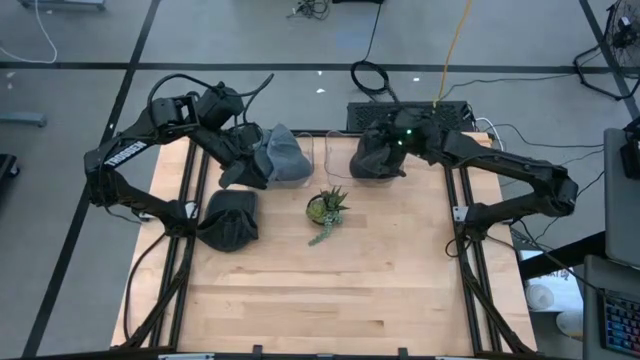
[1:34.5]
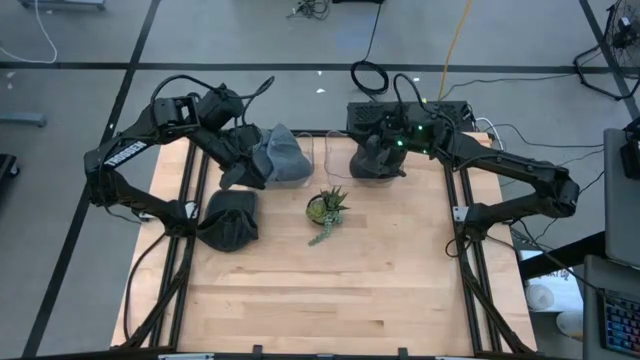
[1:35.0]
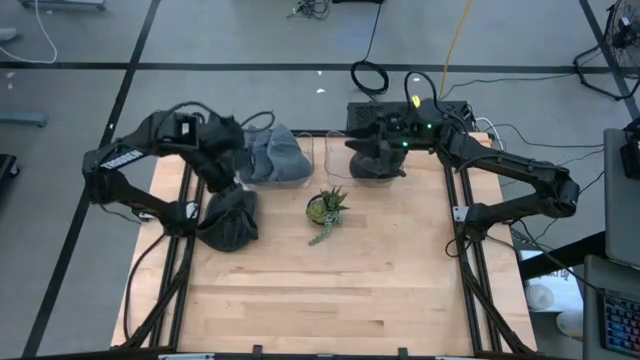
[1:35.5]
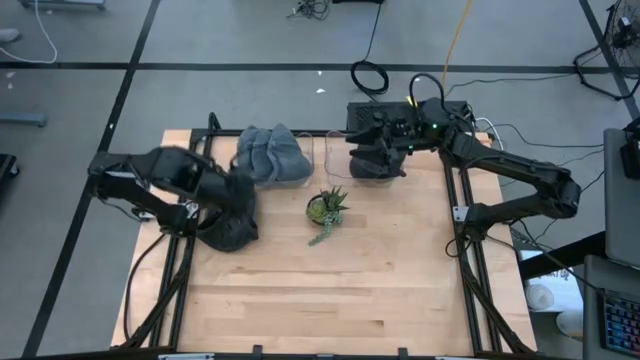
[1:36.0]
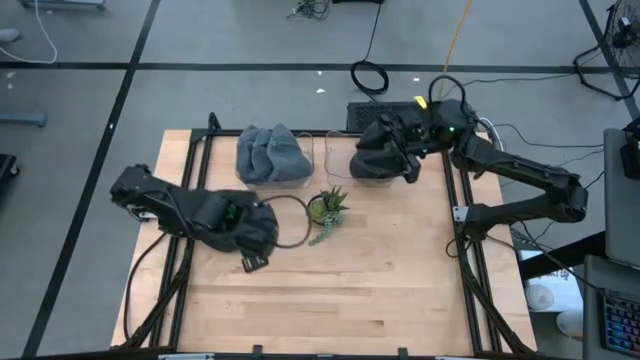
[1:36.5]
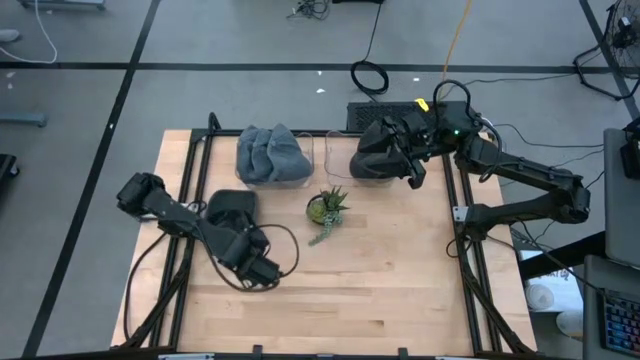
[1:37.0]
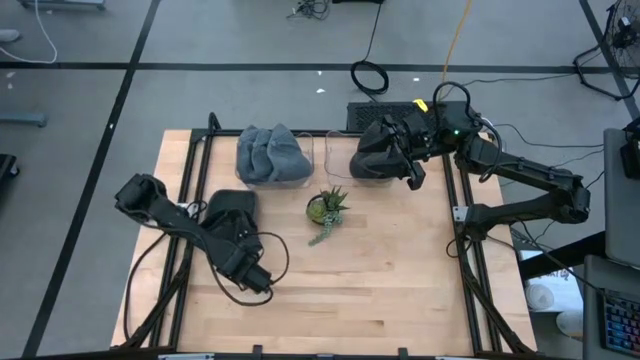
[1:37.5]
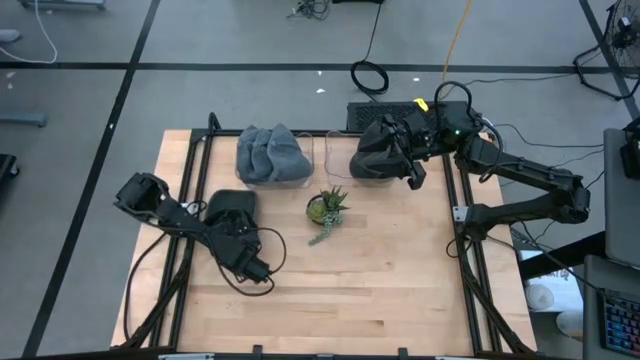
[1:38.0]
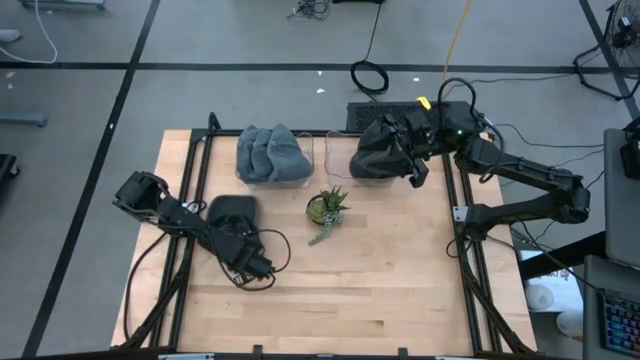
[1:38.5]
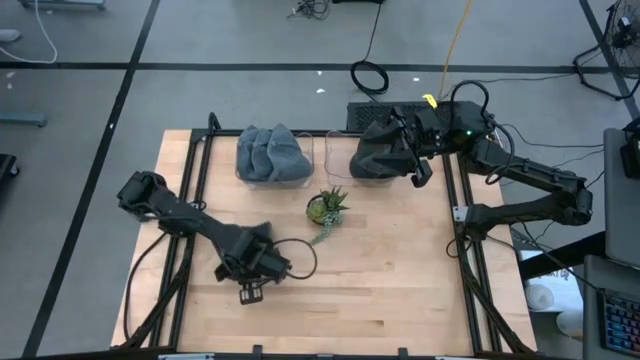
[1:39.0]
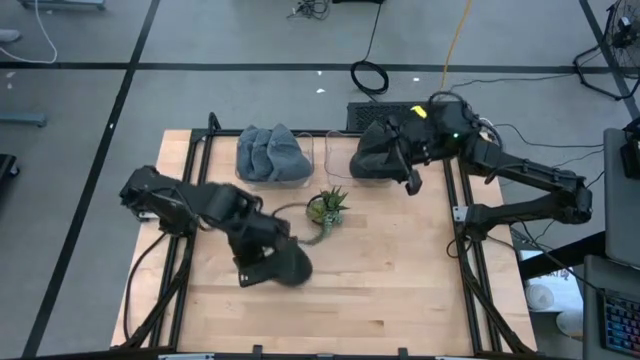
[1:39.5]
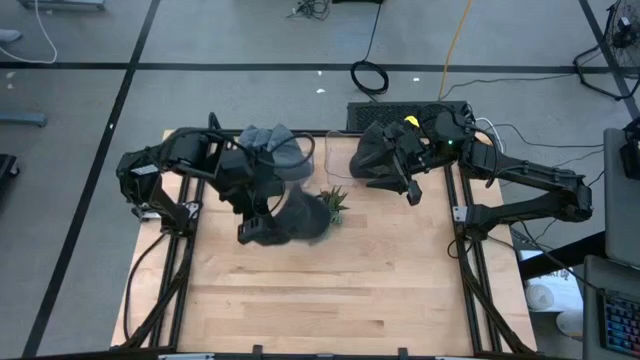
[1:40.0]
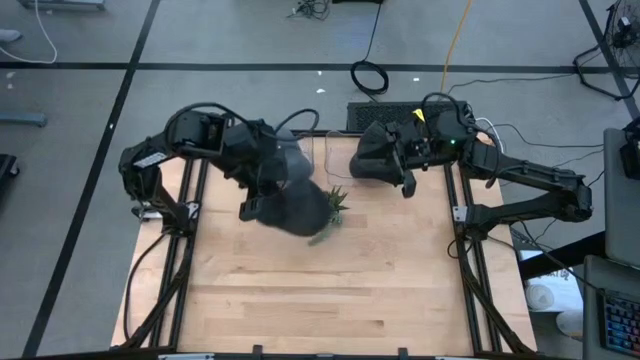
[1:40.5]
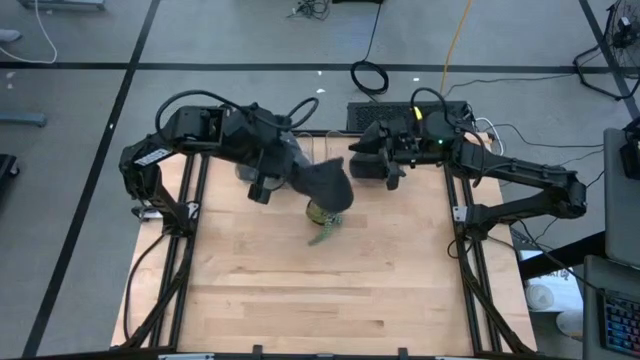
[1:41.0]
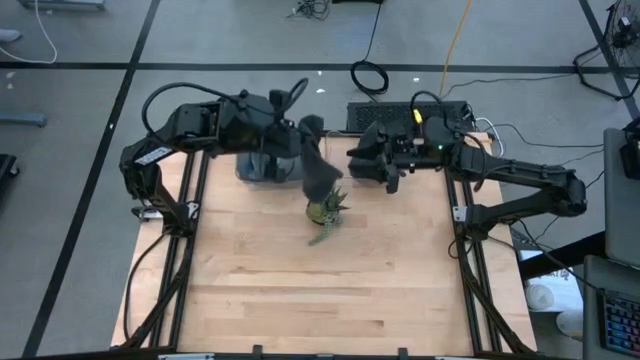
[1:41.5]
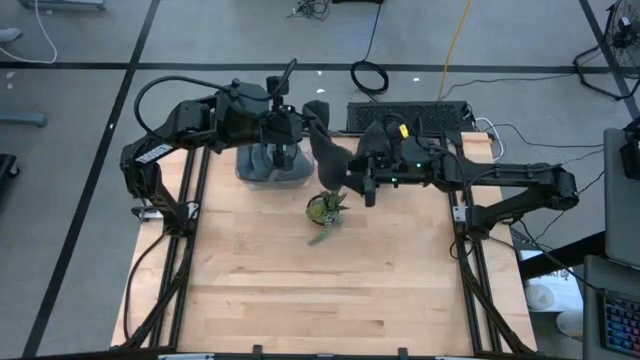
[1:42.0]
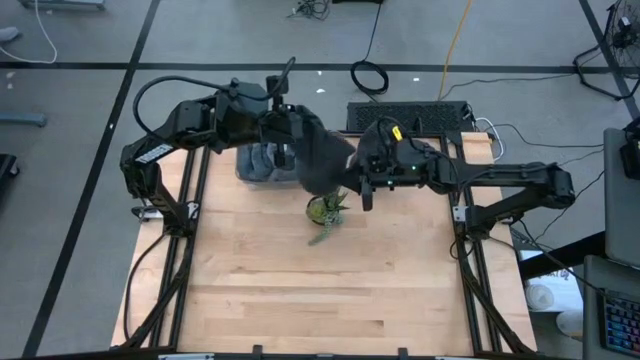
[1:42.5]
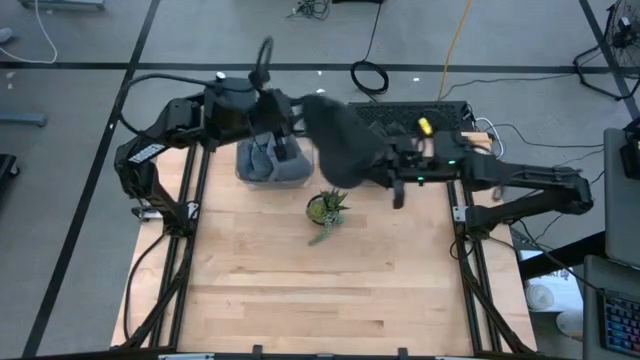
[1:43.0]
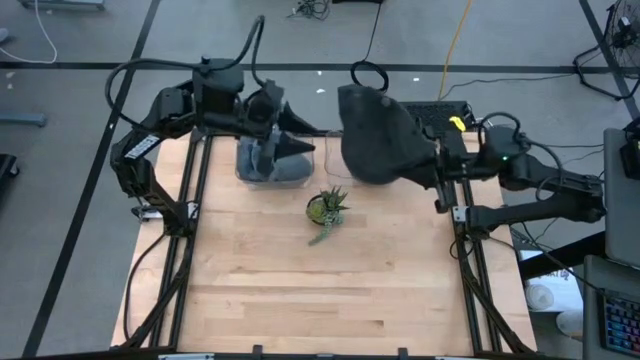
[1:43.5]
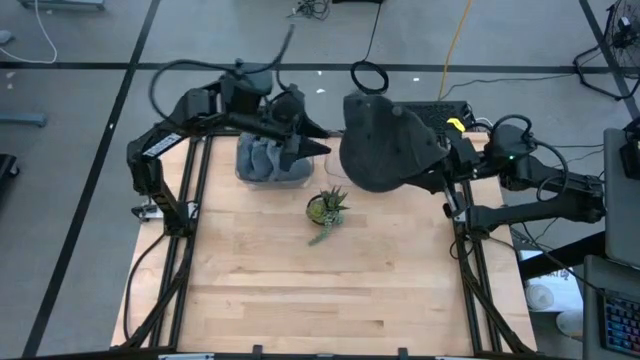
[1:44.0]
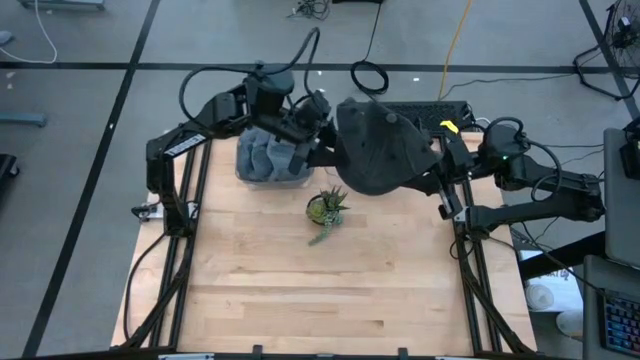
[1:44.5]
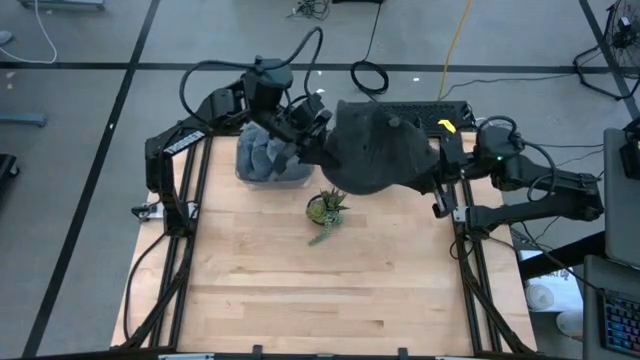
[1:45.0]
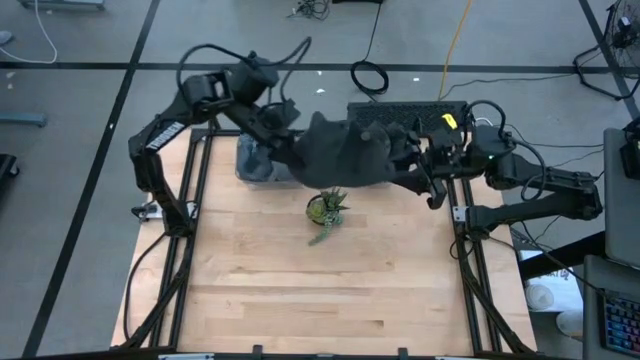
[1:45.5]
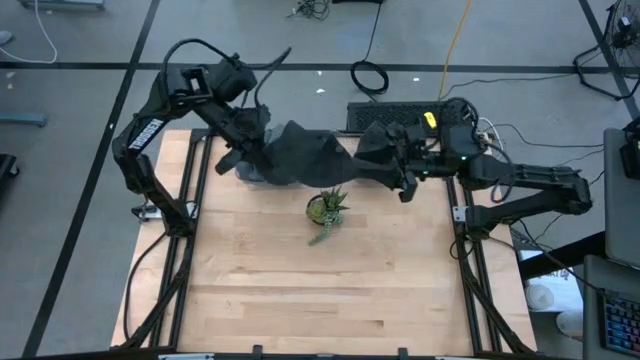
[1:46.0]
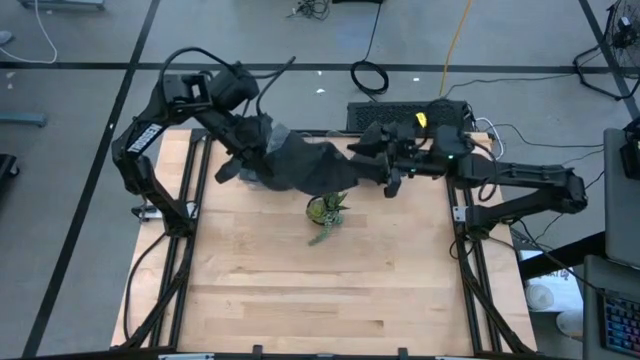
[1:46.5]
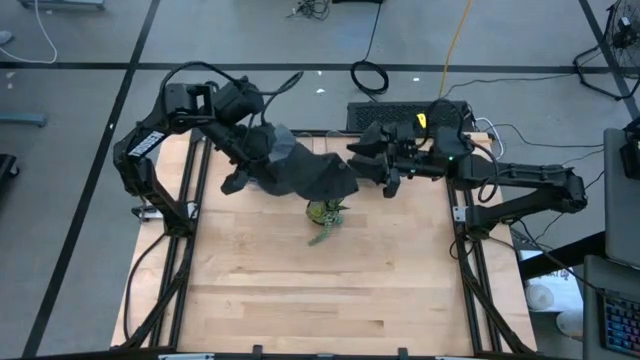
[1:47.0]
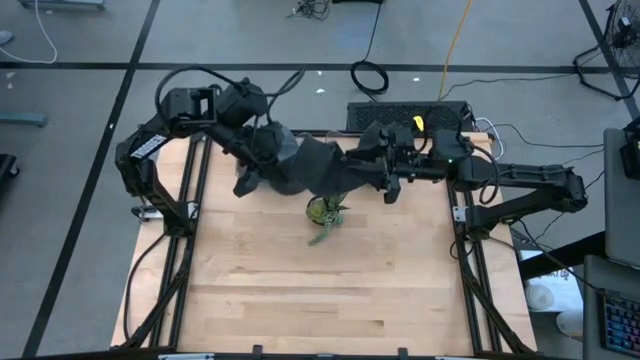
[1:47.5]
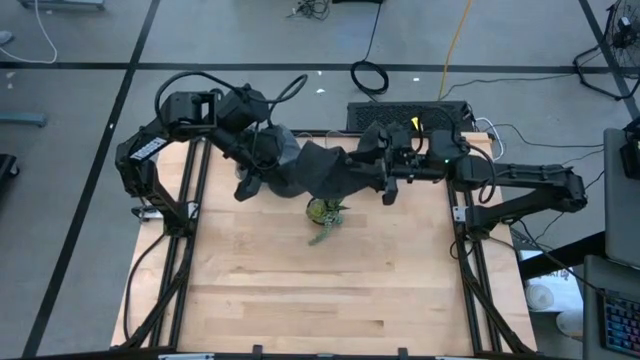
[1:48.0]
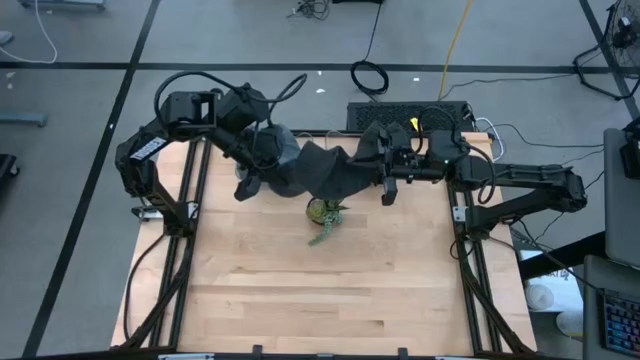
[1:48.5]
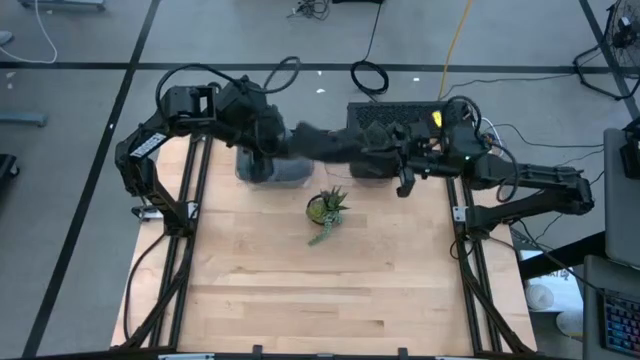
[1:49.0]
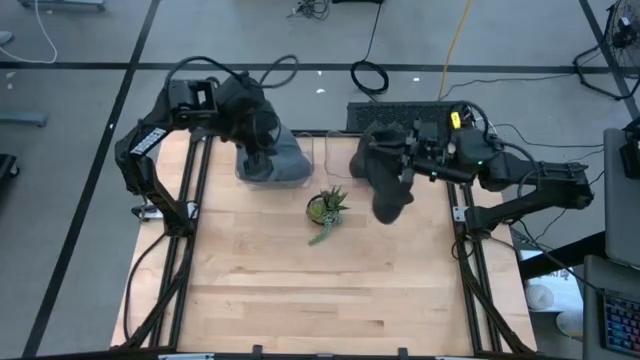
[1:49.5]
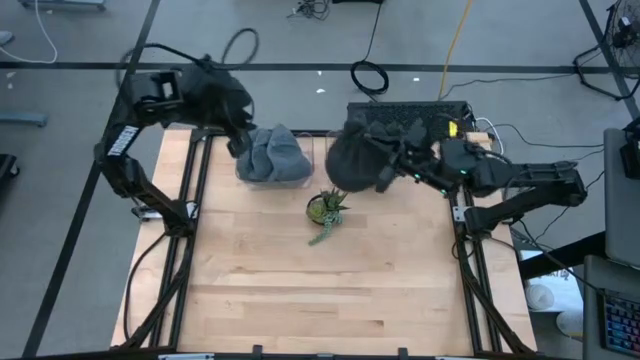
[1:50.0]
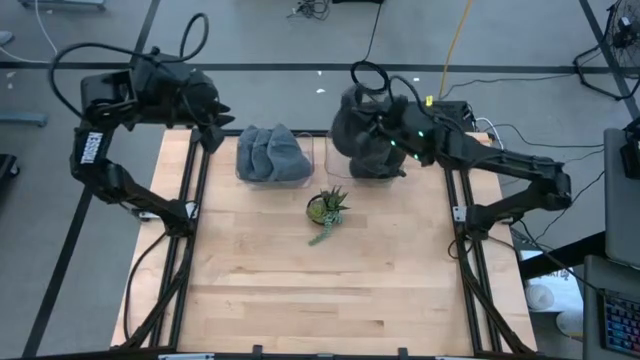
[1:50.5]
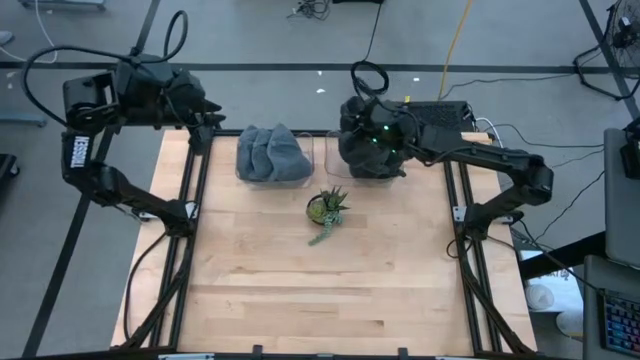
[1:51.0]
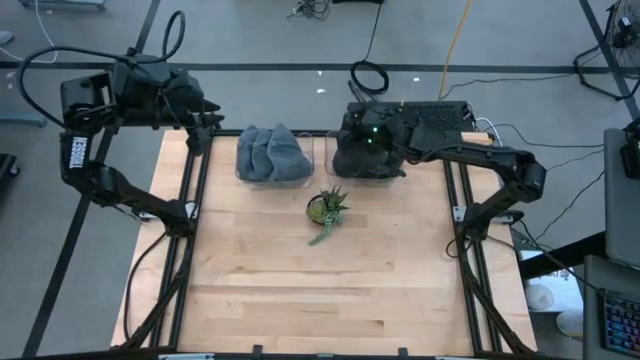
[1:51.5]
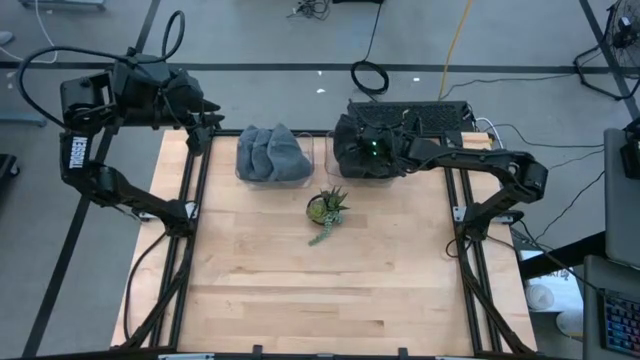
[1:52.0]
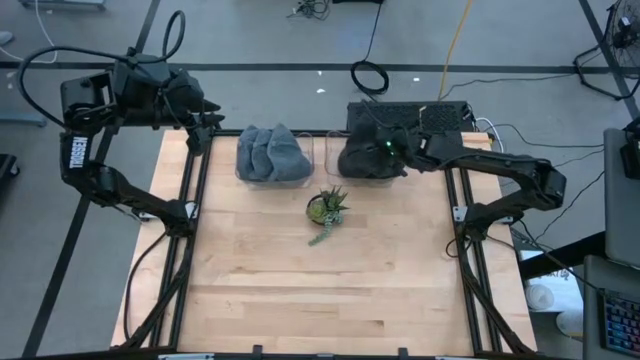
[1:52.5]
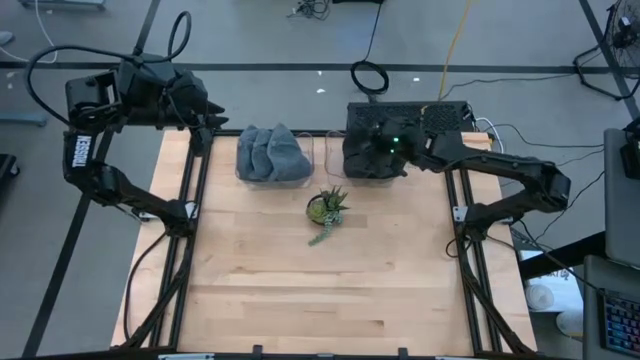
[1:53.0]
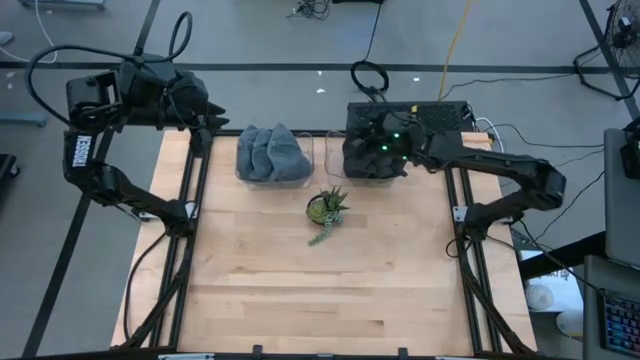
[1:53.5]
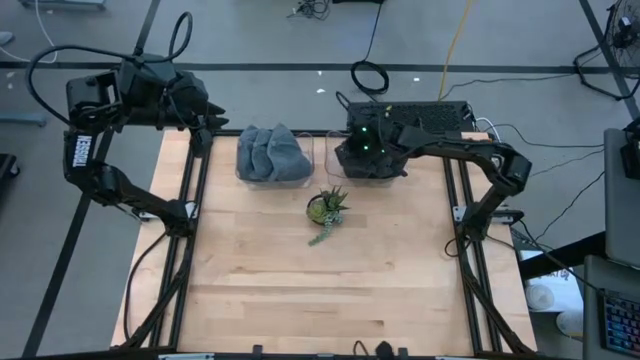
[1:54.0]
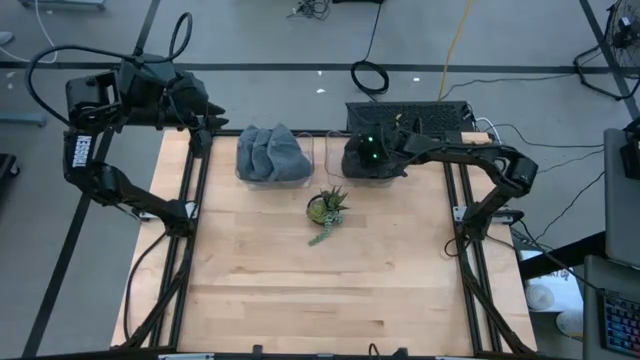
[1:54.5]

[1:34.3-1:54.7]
Task: Pick & Place hat
Put the black cap into the right transparent bin
